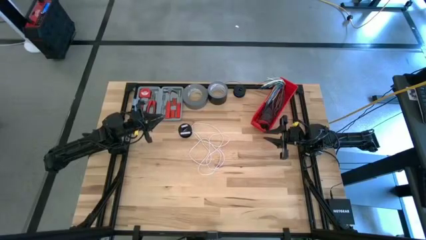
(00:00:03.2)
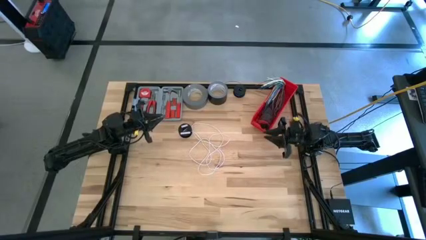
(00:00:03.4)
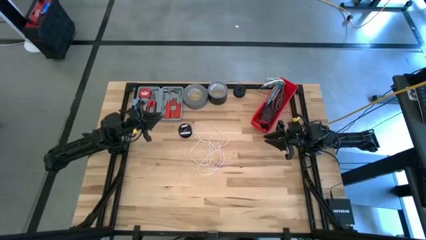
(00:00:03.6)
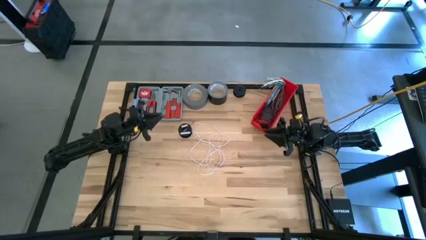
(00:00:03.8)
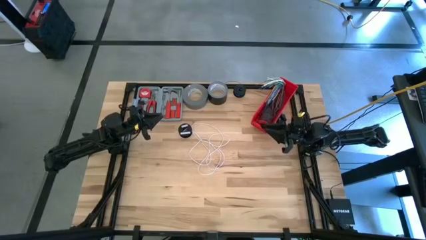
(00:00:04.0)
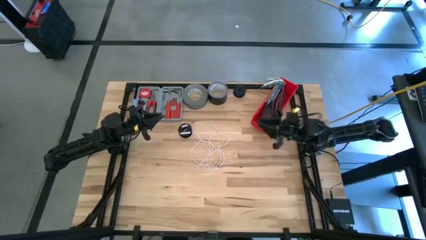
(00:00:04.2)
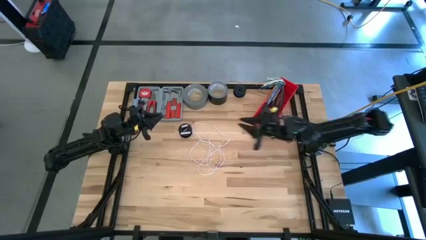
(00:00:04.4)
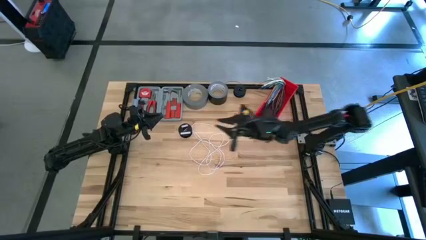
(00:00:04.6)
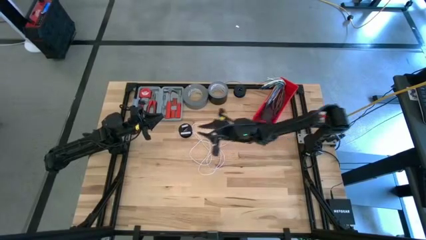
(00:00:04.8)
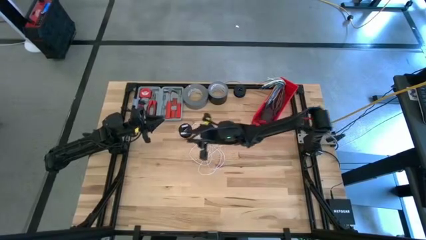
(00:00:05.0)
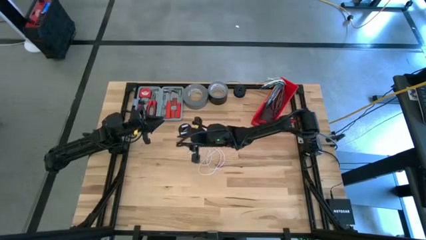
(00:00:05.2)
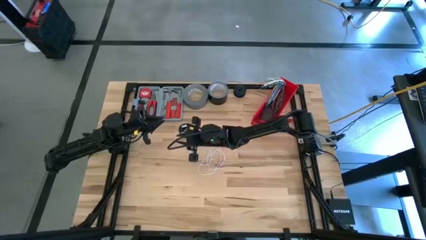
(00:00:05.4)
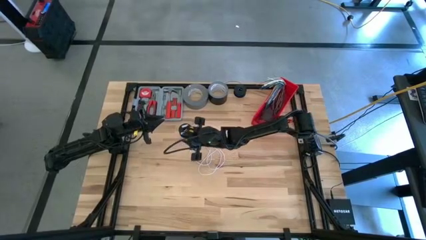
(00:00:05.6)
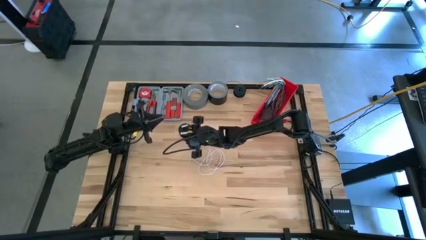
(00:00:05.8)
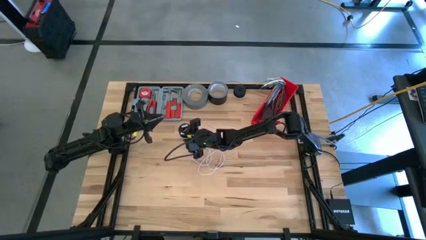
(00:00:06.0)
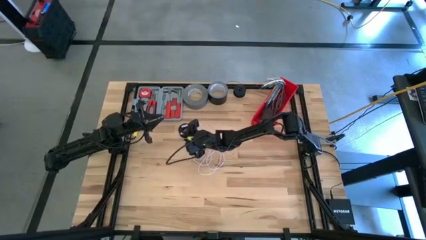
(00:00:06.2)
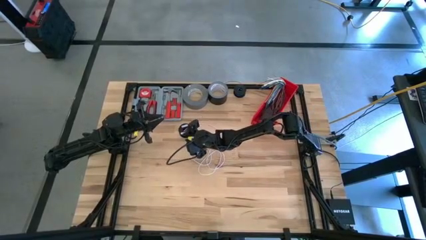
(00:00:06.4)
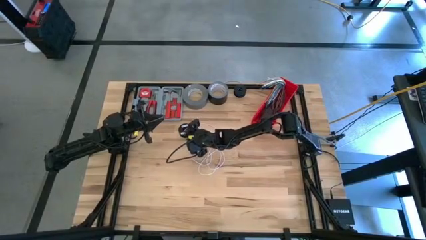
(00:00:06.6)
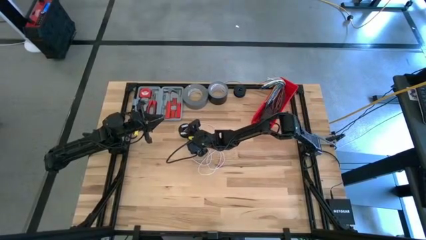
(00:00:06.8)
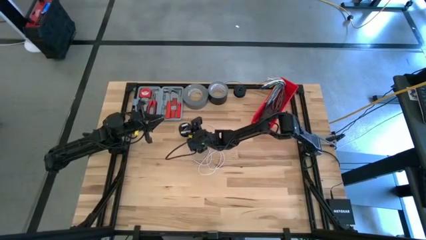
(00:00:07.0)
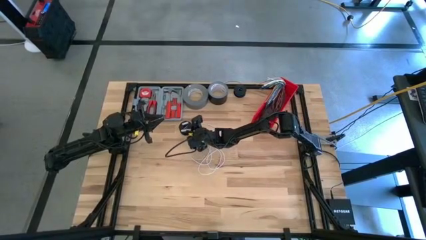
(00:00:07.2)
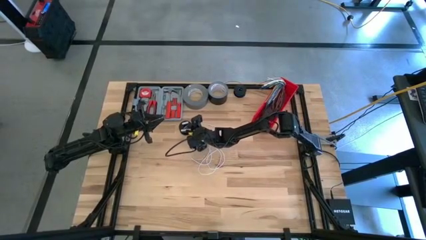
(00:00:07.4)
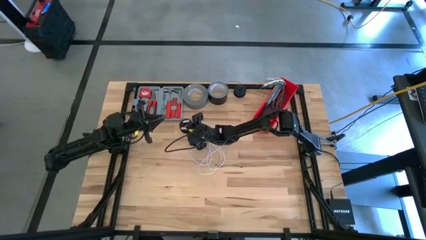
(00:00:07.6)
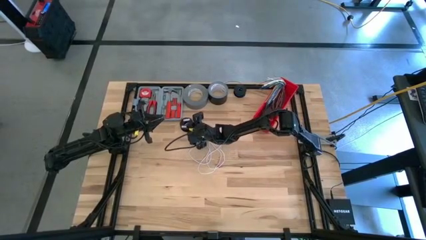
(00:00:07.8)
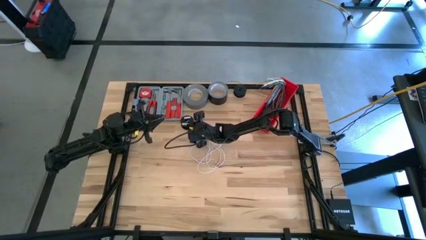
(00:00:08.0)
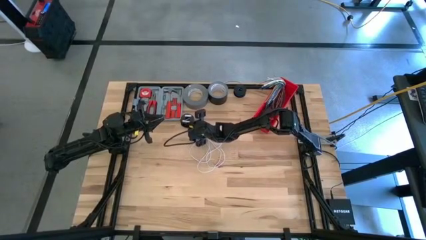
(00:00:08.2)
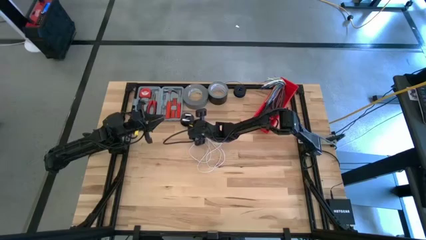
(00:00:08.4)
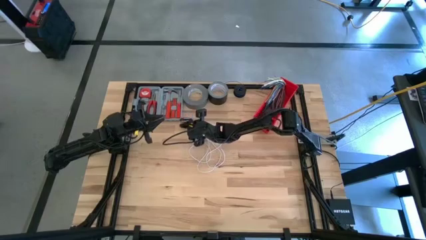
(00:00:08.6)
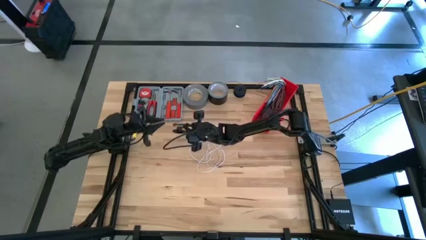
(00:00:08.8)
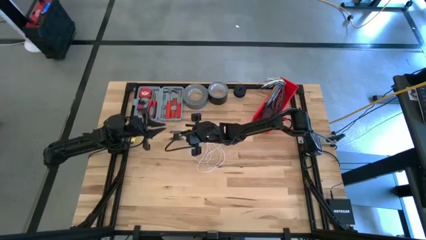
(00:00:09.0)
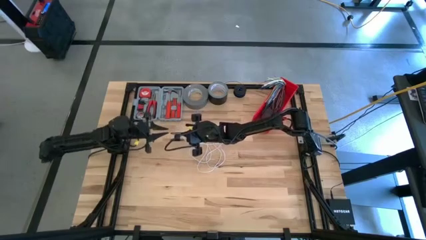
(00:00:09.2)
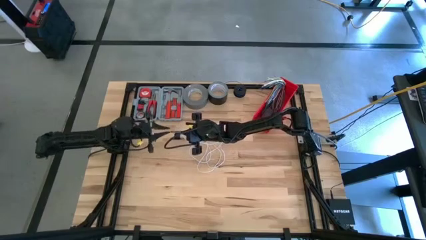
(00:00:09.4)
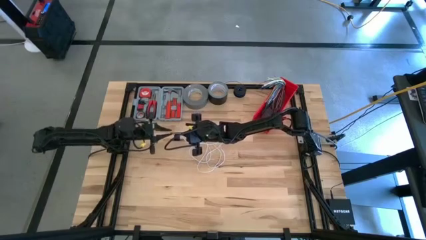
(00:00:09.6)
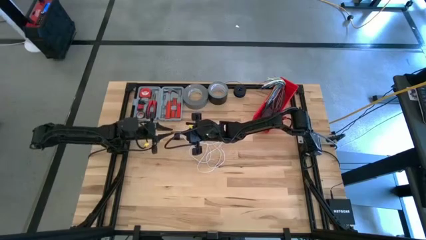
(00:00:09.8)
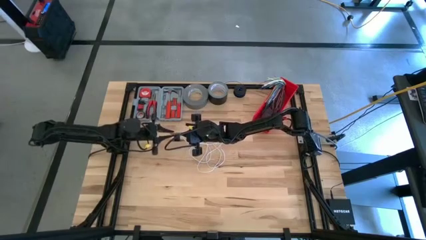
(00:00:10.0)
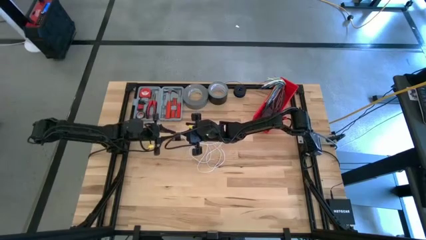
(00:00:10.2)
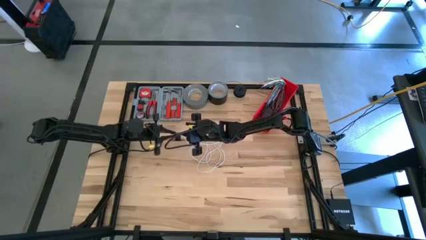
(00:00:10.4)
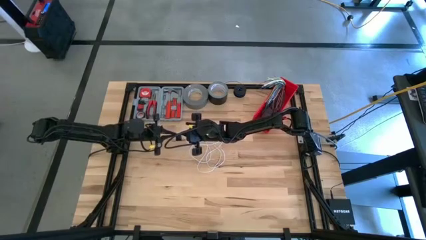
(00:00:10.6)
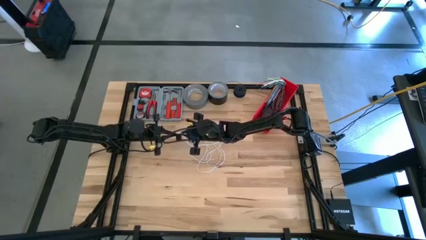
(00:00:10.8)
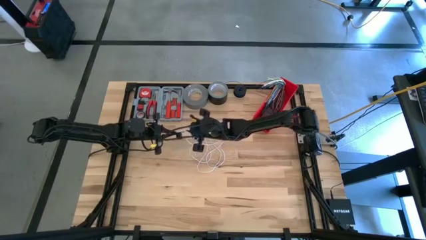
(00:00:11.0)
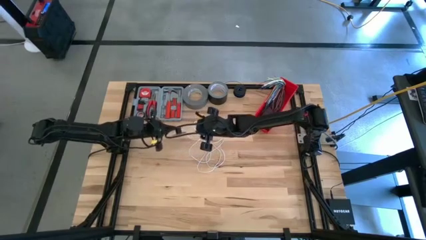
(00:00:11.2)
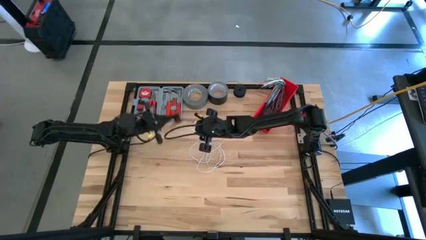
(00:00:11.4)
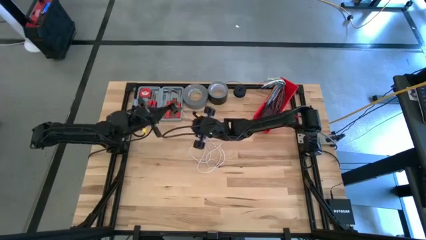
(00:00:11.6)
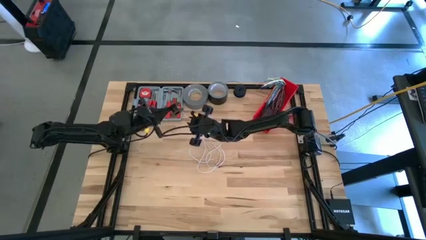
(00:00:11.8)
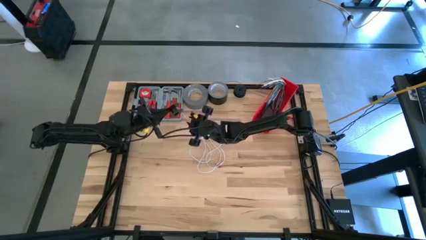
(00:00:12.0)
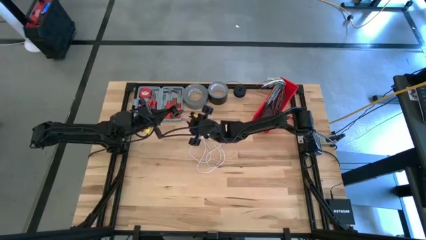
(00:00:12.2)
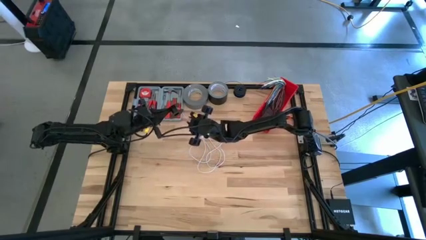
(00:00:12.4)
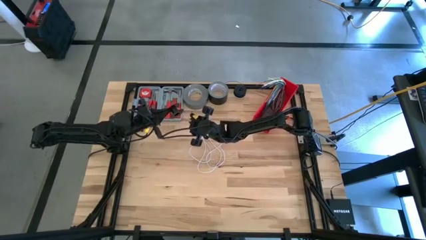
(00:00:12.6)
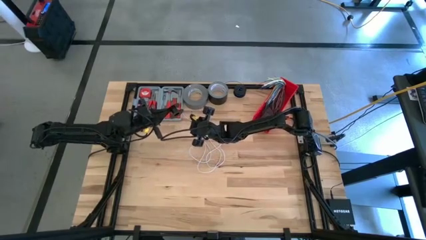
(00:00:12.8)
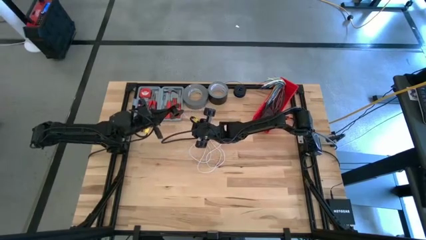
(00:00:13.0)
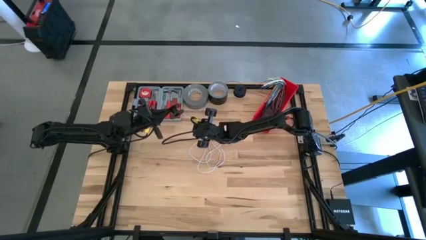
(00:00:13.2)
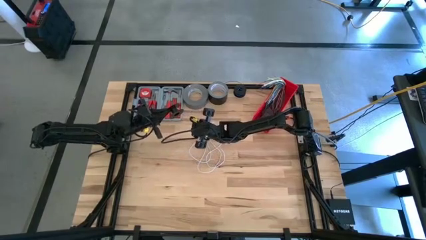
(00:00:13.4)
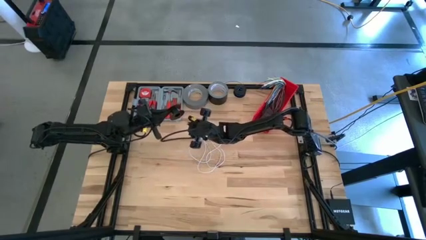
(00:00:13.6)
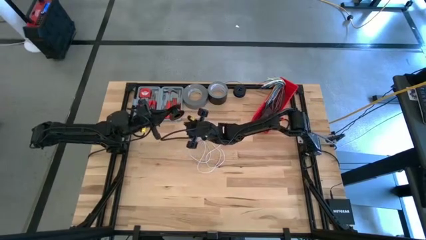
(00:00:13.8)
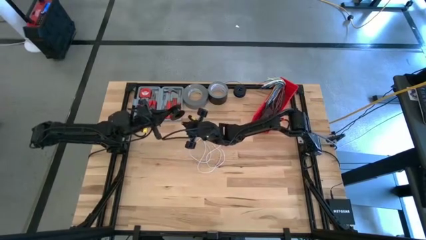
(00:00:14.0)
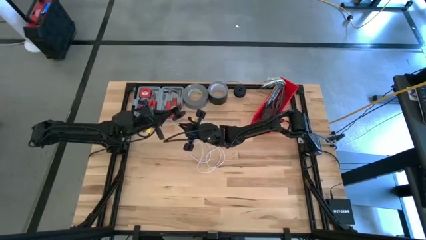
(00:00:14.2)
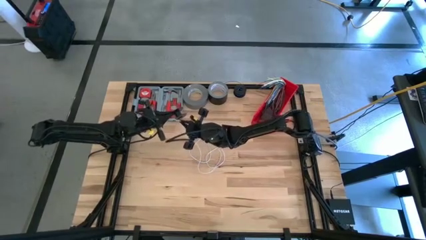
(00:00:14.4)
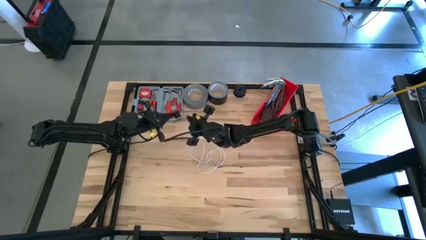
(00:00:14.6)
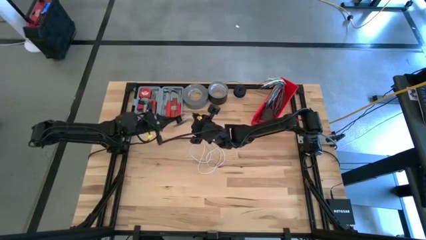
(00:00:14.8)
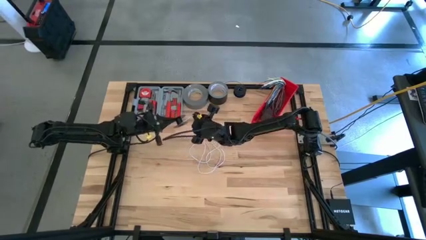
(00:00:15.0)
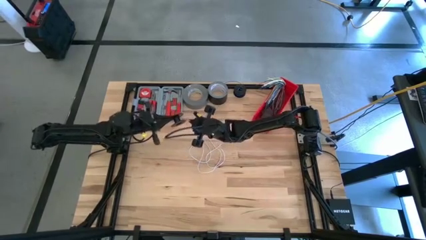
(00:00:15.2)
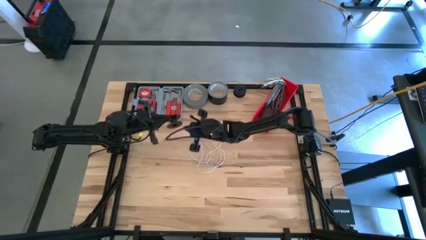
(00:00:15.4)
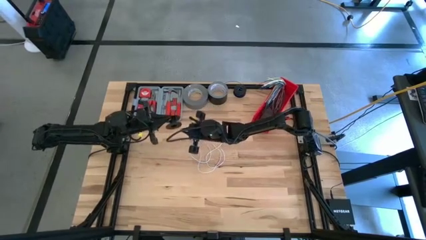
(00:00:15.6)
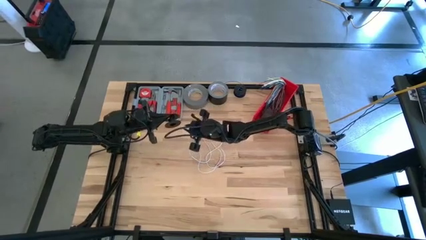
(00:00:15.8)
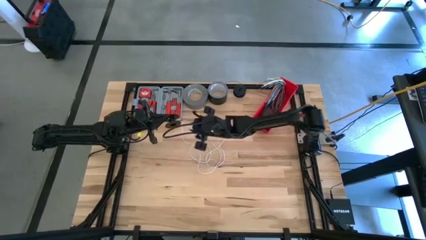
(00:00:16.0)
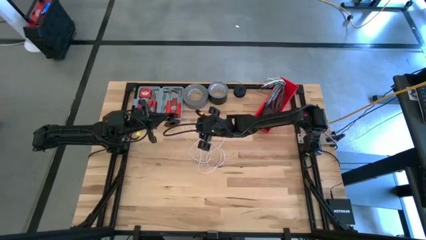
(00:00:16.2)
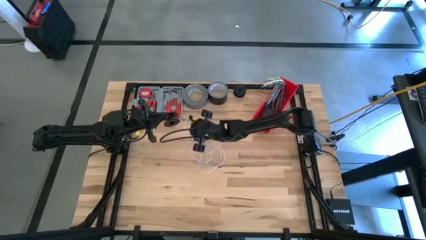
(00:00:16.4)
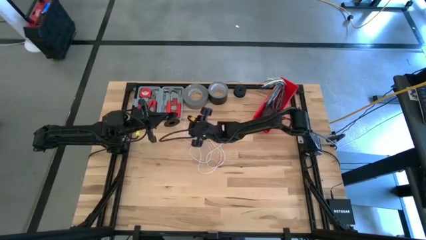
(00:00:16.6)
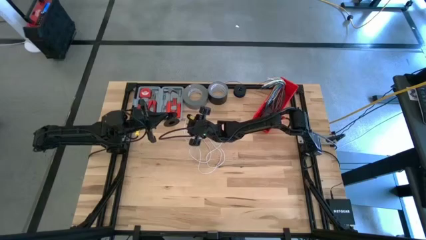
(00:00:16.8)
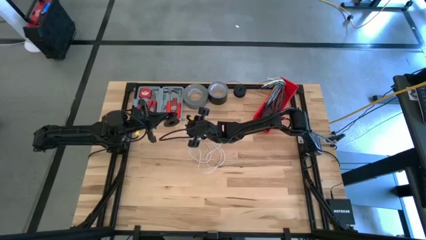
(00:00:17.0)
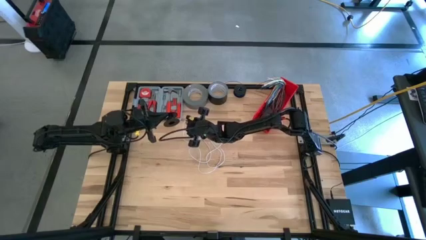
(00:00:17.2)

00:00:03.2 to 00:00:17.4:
Task: Coil cords
Coil the white wire on the black spool

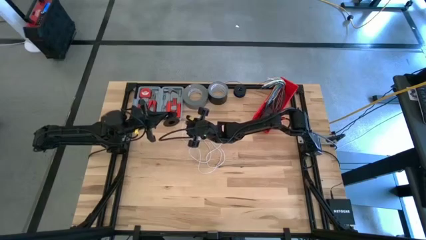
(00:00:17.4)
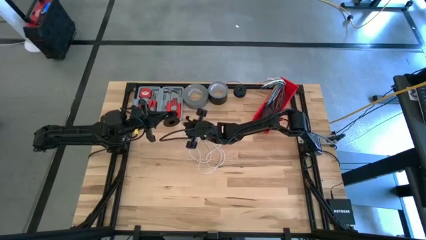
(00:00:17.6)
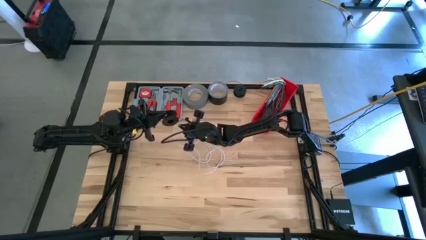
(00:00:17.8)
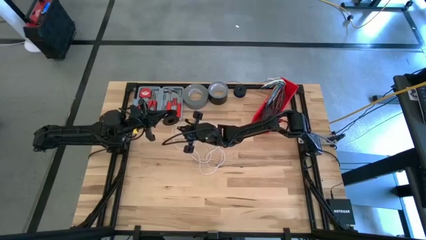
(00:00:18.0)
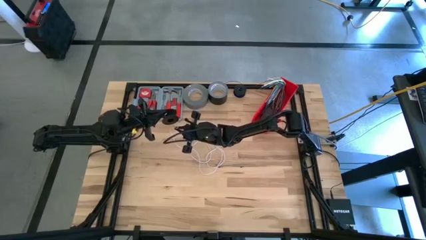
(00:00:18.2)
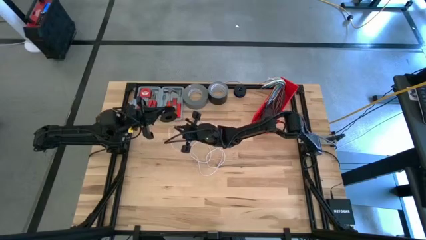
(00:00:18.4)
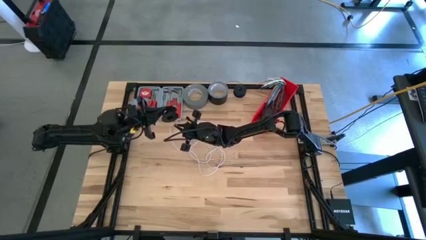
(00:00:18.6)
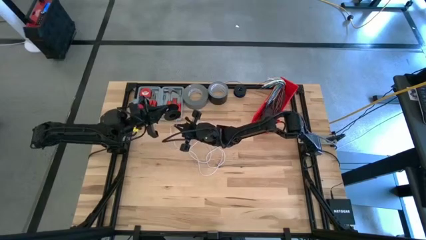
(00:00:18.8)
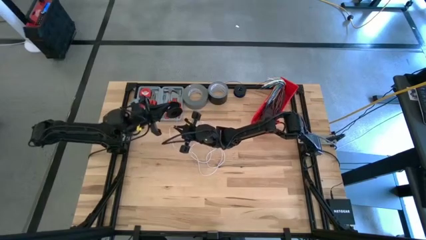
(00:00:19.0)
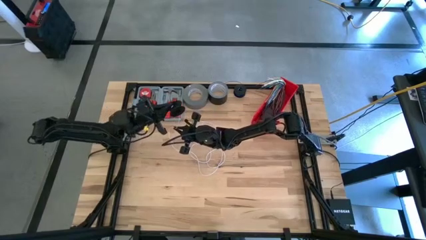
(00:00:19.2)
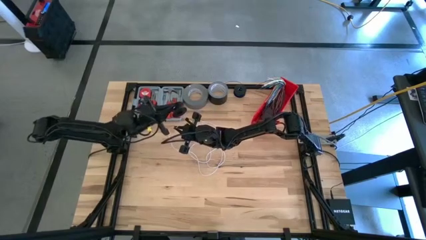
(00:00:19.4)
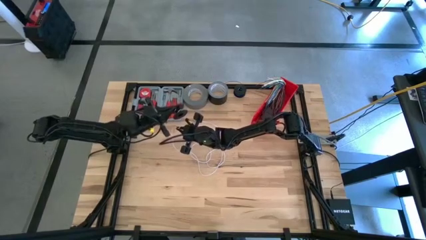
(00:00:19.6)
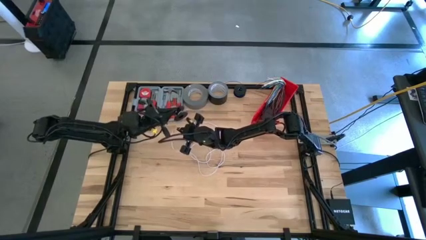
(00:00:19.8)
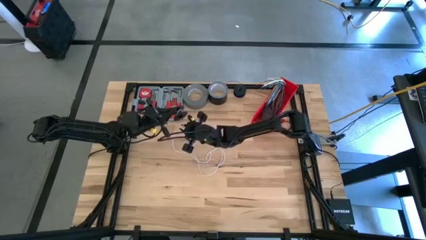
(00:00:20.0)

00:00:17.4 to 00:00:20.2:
Coil the white wire on the black spool
